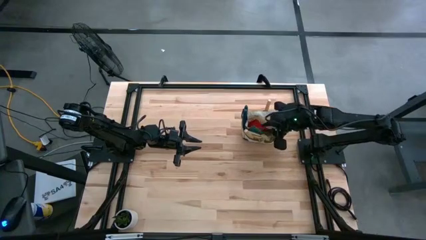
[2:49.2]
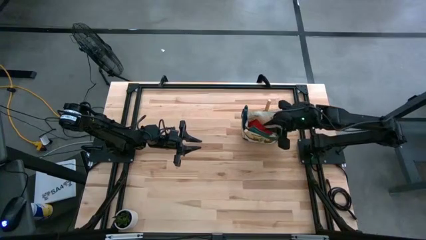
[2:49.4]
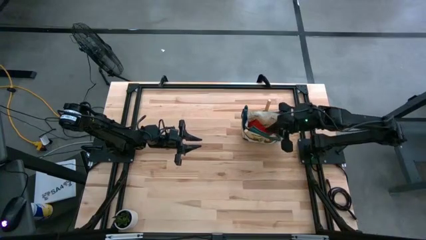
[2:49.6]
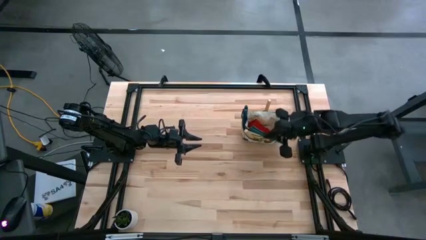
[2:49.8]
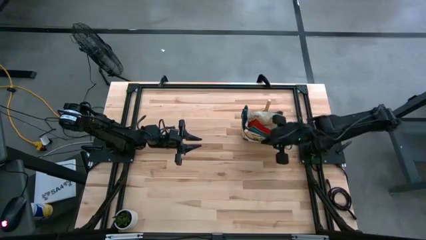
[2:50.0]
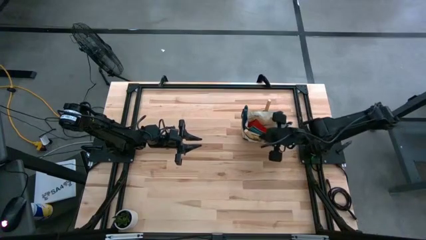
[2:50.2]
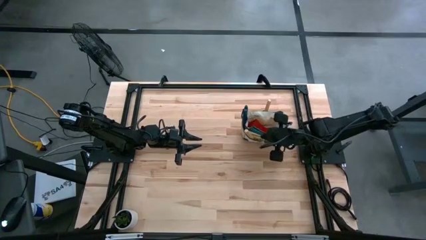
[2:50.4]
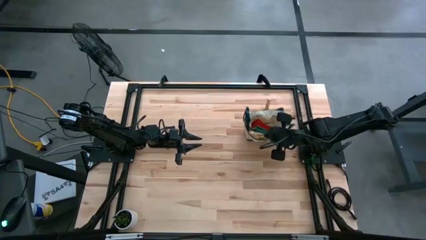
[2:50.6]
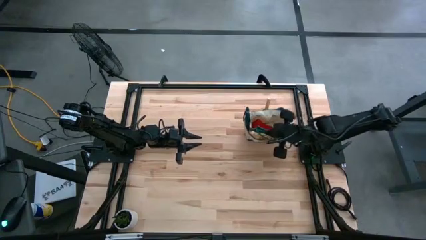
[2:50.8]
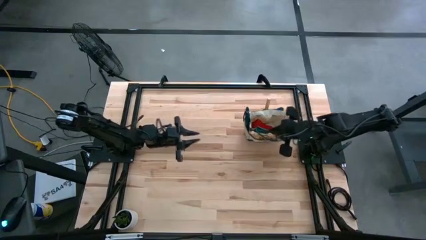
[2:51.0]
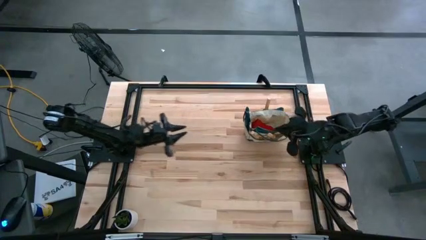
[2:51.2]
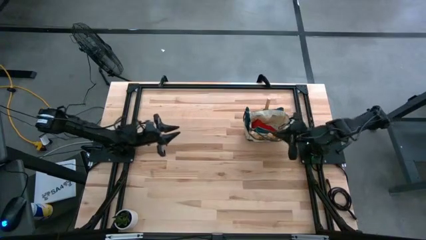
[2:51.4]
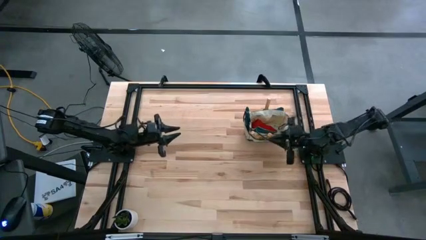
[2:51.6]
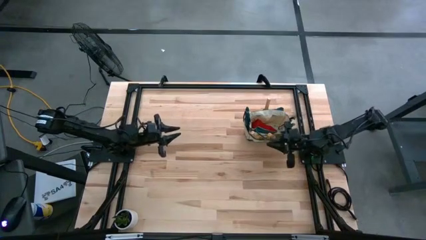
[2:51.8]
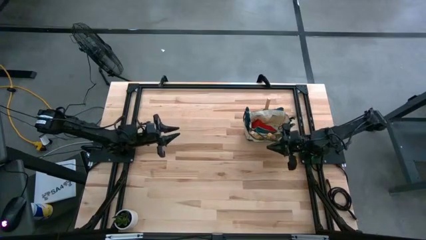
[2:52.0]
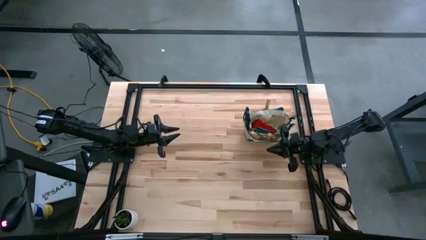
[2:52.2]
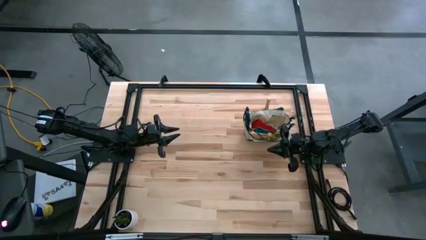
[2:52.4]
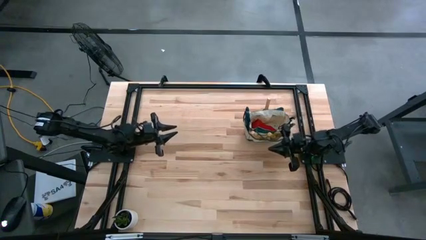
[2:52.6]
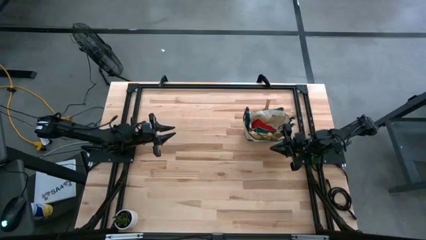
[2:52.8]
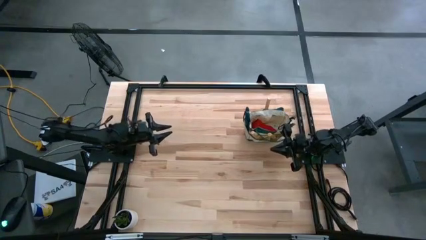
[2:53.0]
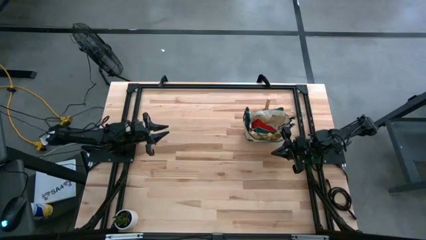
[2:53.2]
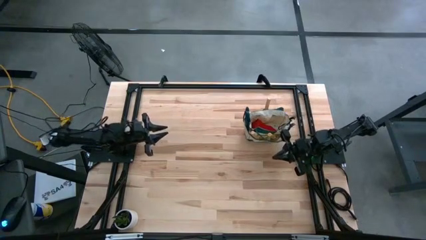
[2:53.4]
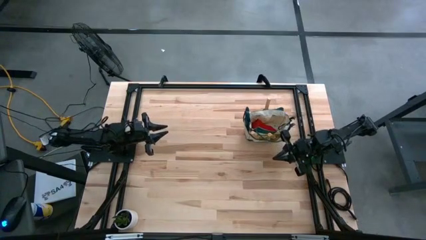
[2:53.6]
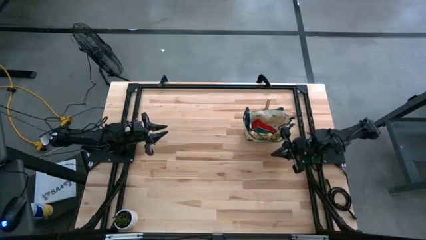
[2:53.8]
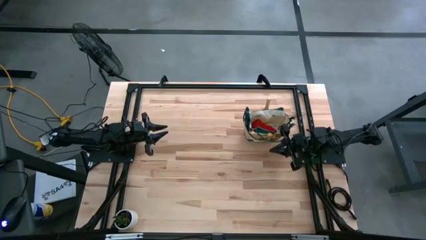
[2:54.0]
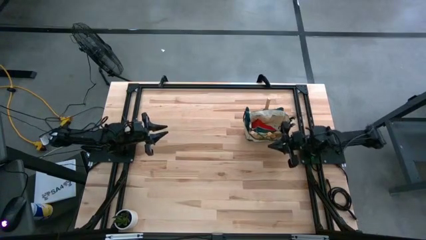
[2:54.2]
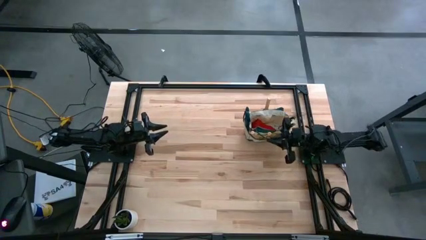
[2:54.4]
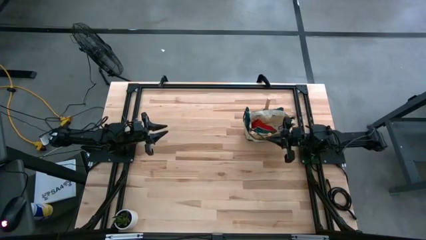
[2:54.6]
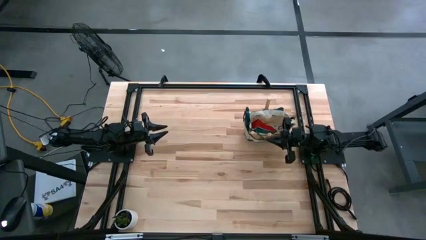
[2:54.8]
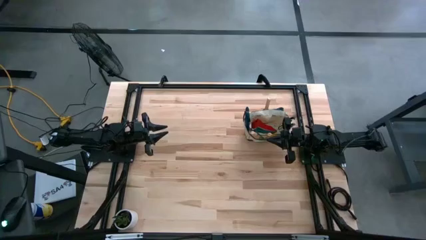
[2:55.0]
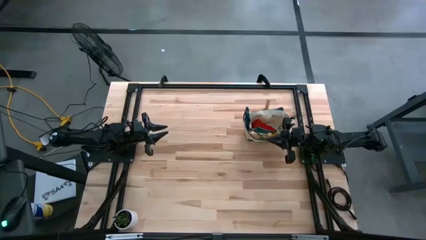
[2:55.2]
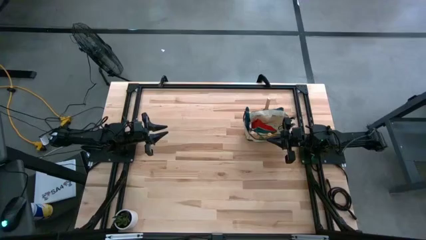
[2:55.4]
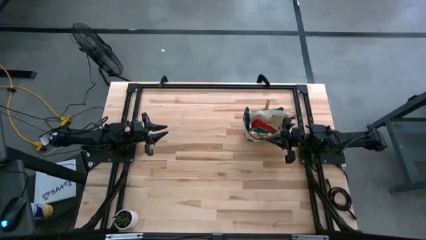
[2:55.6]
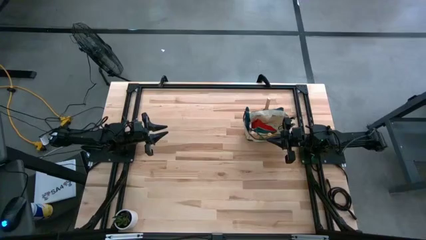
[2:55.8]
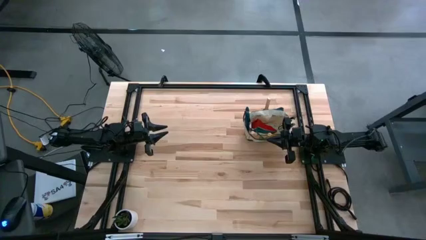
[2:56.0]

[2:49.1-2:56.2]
Task: Pick & Place Garden tools in Gardening bag
Return to Home Position

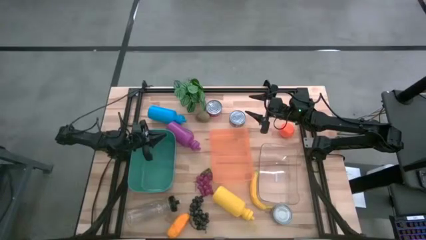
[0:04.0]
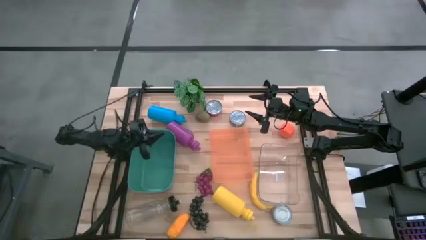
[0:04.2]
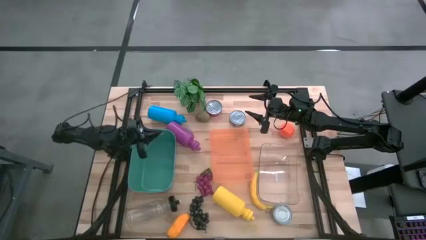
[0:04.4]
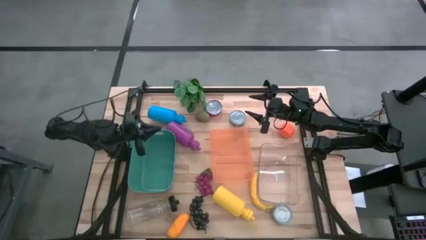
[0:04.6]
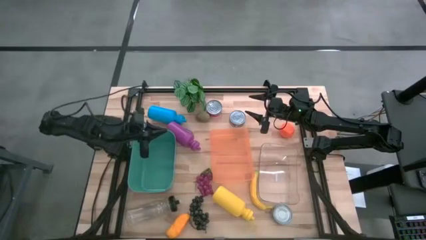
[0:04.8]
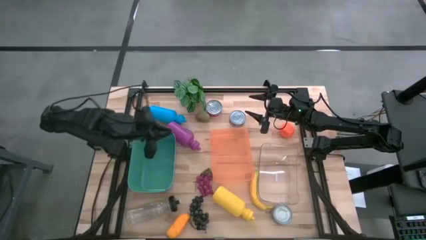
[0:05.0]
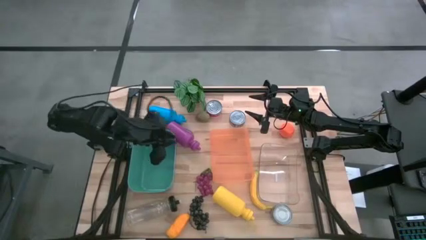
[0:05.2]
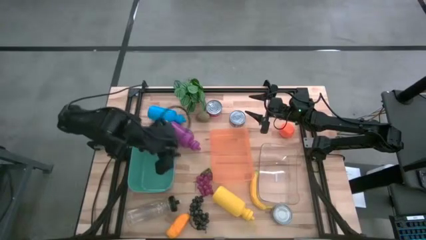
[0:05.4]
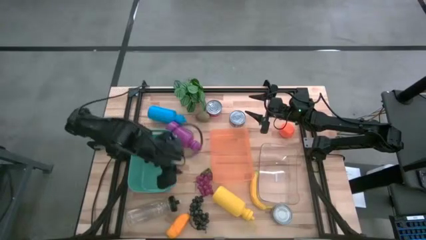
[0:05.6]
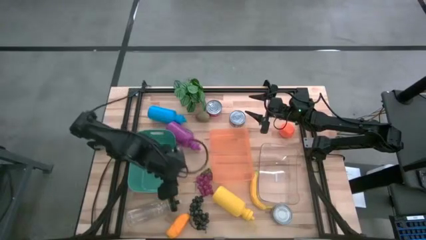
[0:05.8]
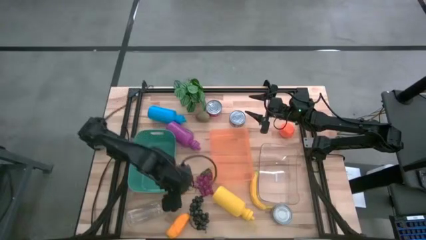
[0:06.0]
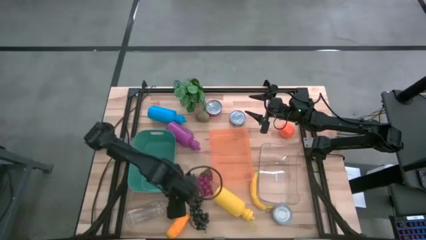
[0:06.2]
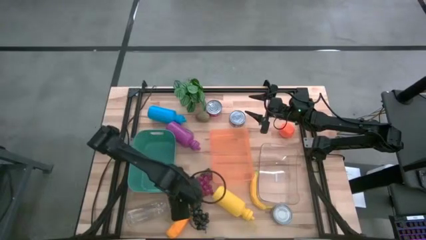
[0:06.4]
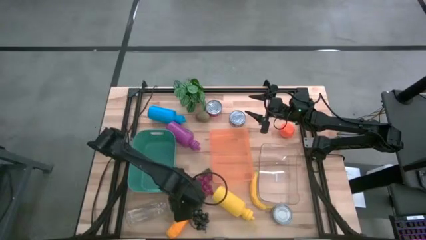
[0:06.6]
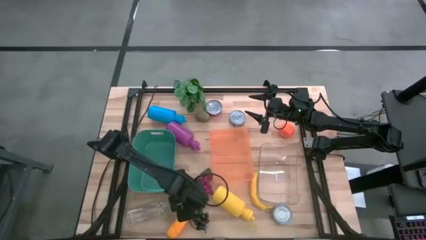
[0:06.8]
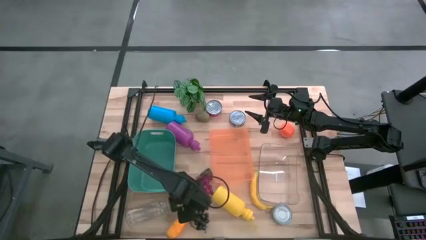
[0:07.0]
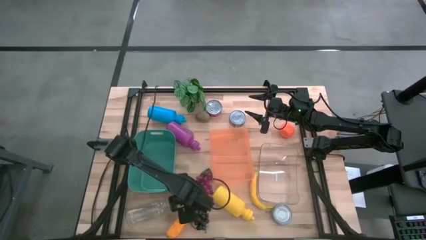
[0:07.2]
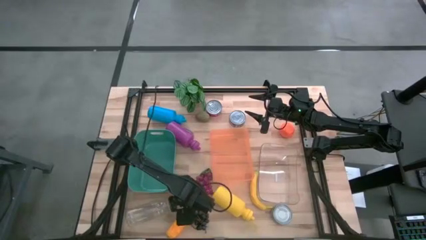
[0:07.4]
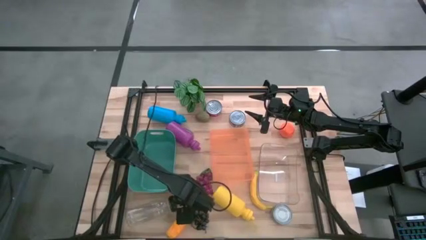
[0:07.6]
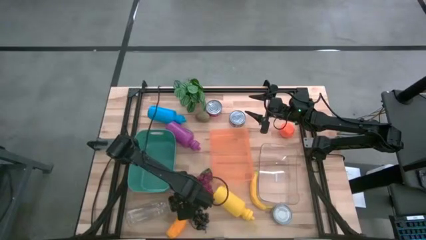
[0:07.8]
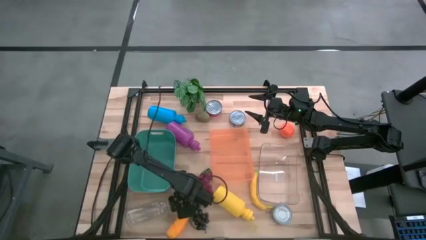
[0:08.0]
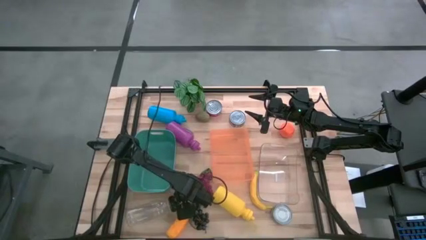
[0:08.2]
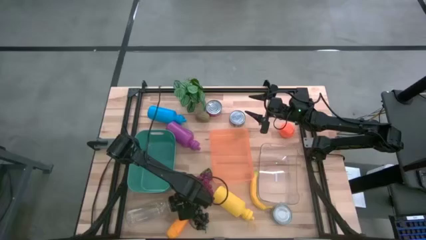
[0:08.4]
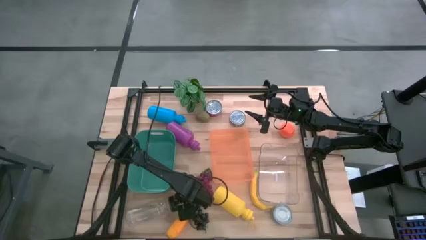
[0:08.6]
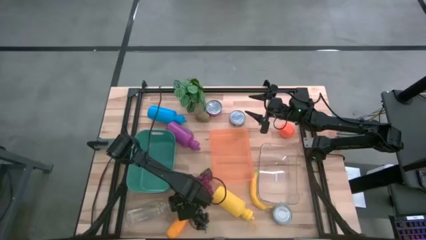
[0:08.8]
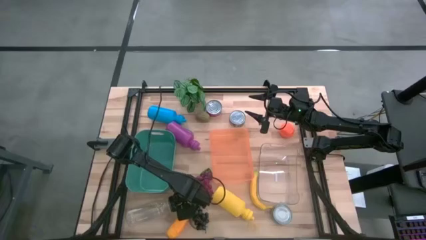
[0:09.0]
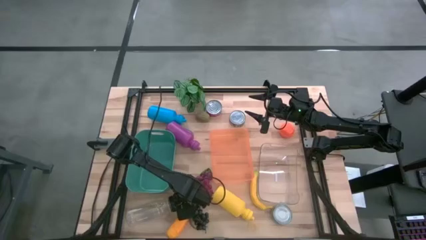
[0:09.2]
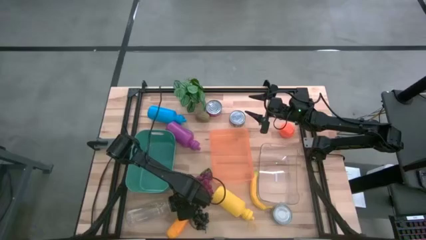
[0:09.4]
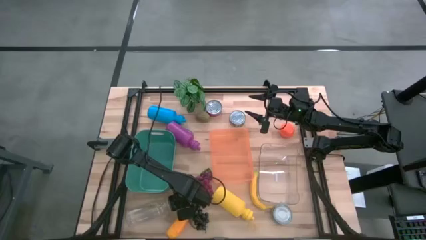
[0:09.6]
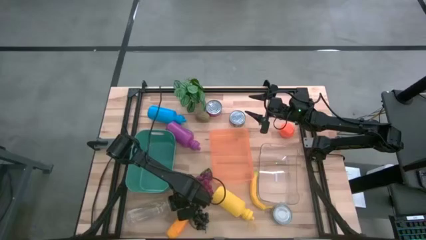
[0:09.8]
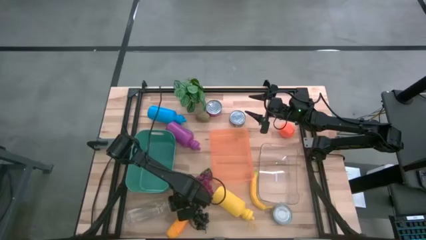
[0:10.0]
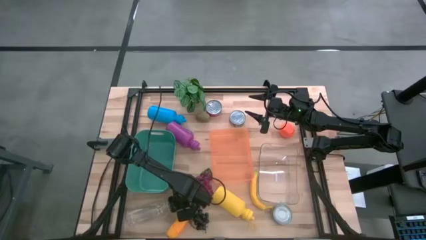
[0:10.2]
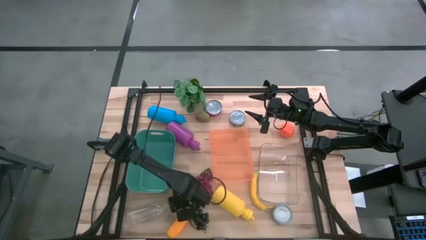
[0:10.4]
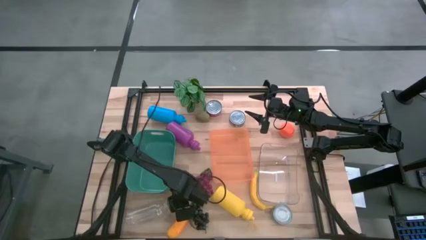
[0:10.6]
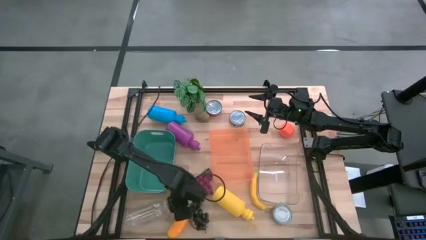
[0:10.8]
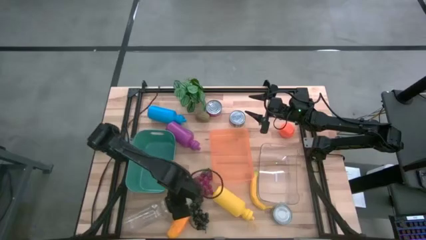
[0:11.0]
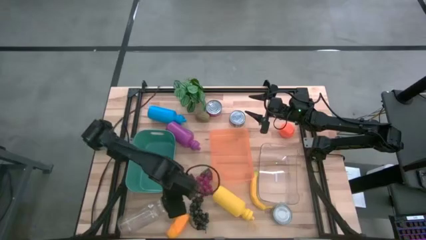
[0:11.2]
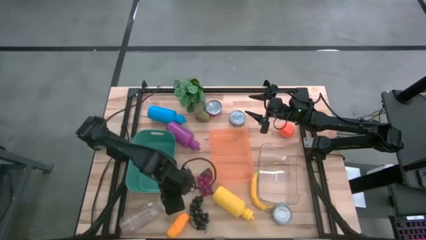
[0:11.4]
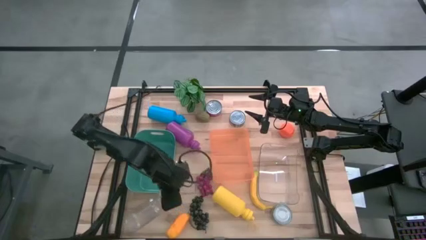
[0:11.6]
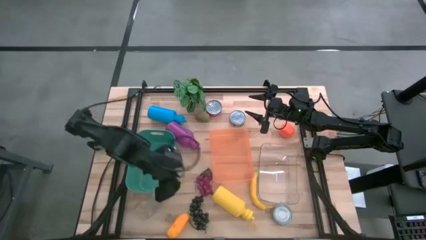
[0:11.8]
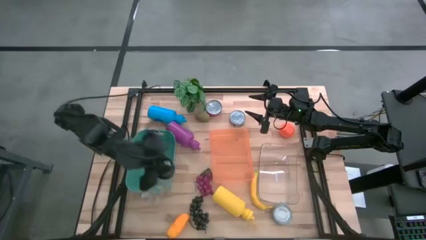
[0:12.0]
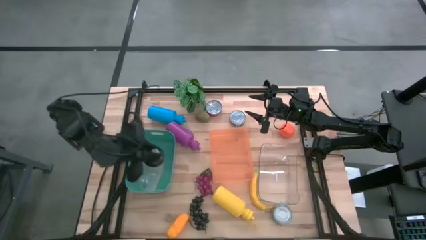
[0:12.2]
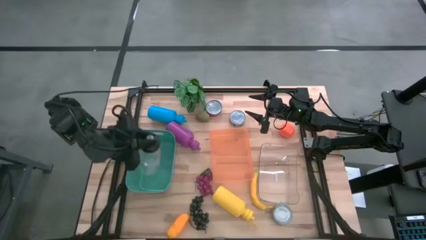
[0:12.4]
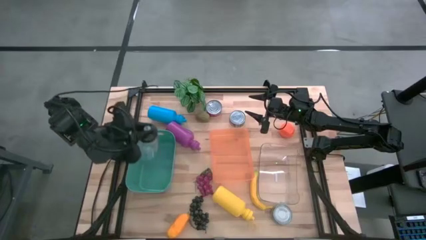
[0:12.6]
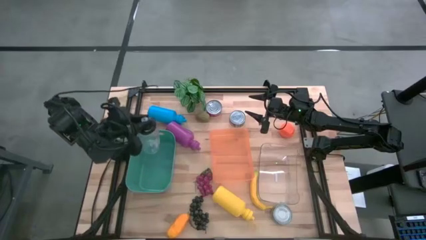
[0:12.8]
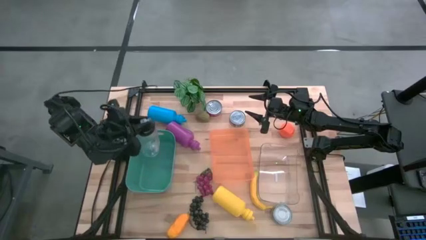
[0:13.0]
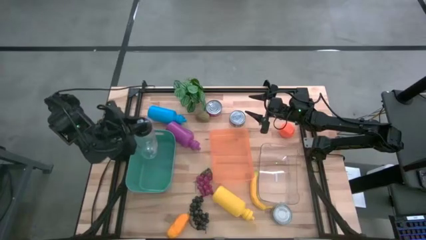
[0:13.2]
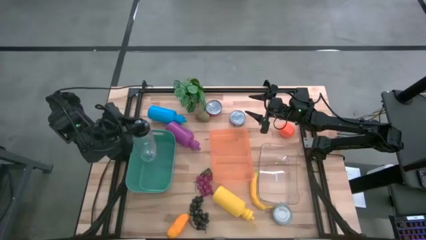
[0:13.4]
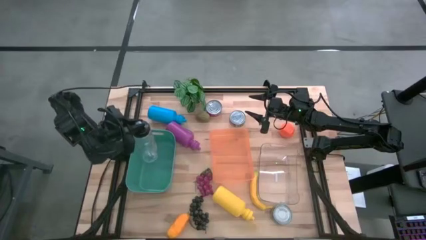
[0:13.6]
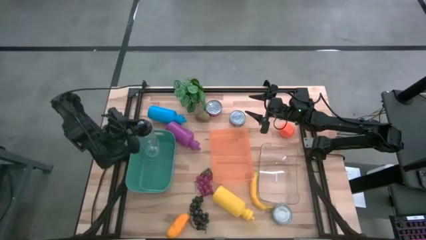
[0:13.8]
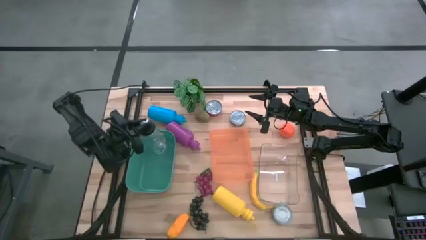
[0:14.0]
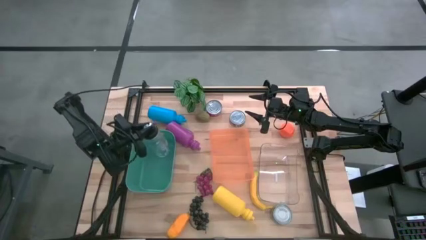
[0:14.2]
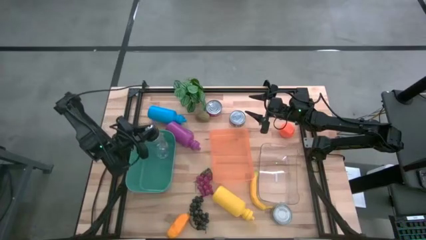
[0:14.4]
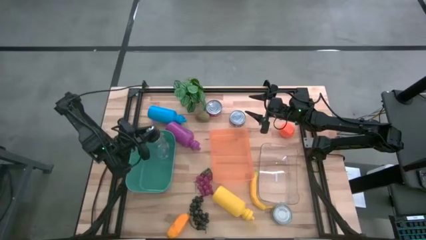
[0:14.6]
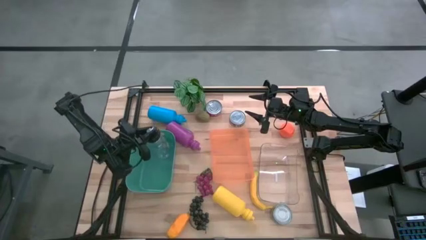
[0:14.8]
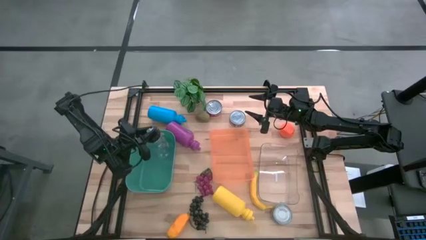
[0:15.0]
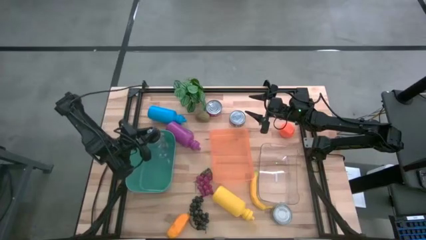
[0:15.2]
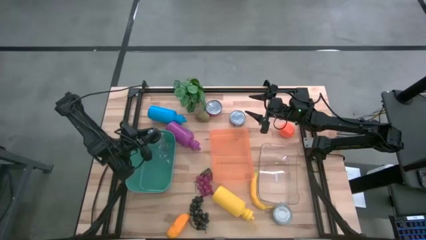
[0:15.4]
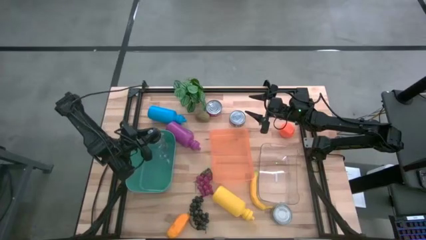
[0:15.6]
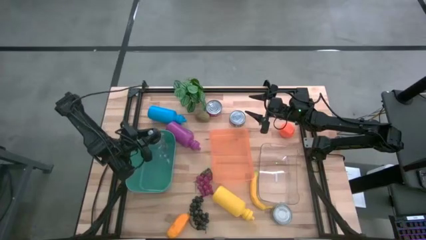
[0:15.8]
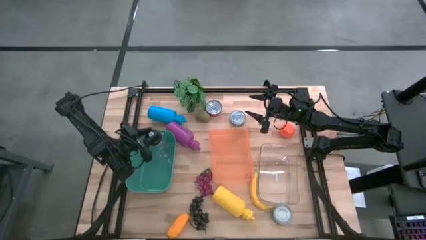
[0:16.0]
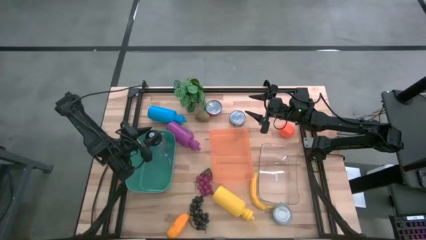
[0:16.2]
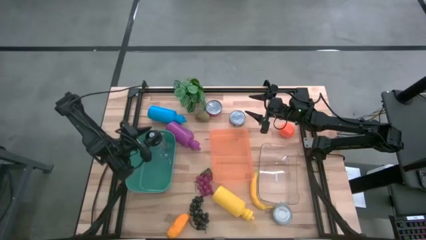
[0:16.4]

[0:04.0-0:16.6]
Task: Pick & Place Food Item
Put the transparent water bottle into the green bin
